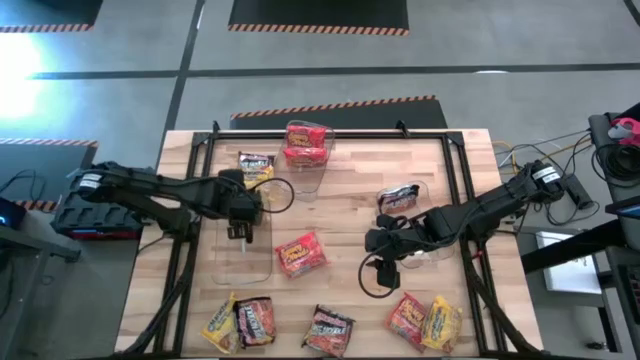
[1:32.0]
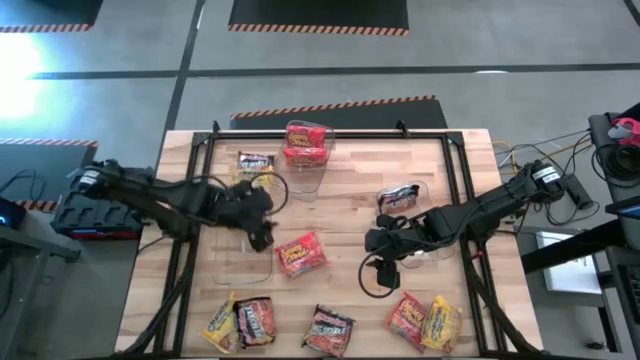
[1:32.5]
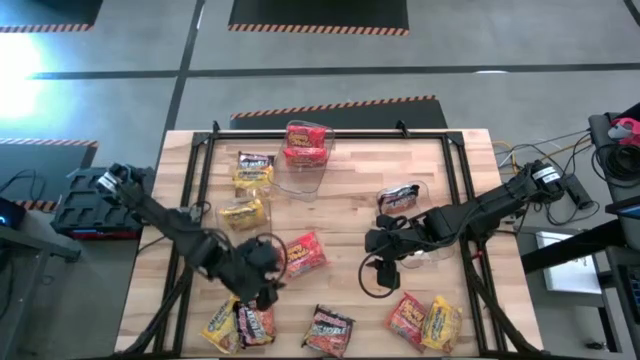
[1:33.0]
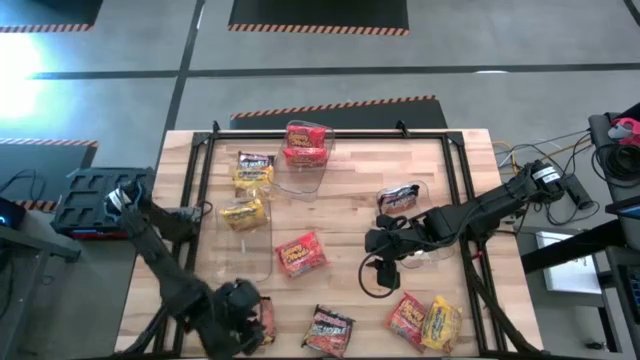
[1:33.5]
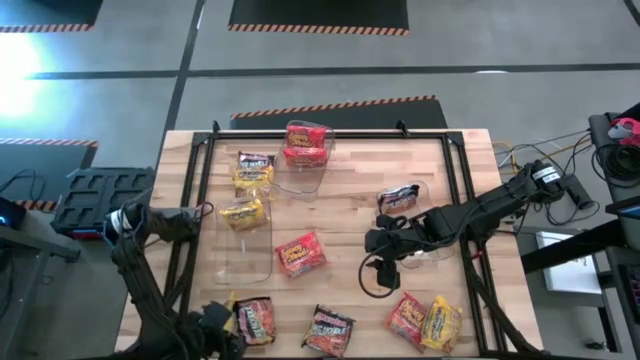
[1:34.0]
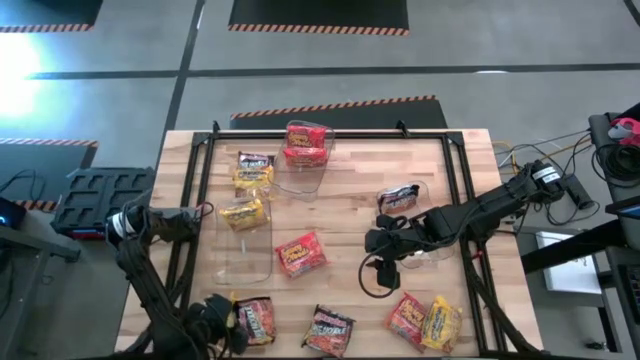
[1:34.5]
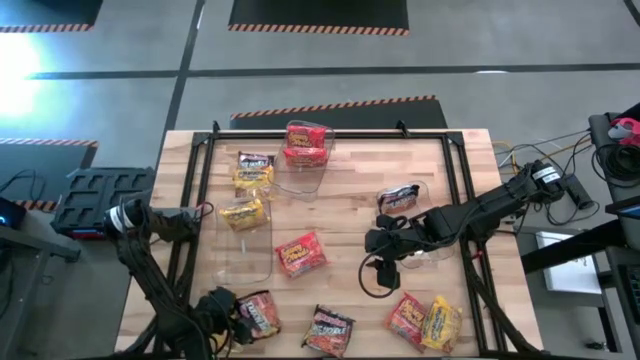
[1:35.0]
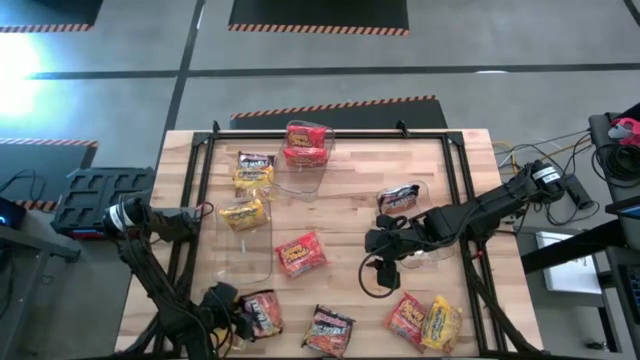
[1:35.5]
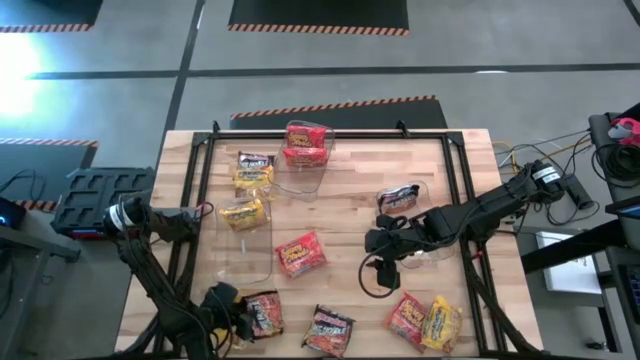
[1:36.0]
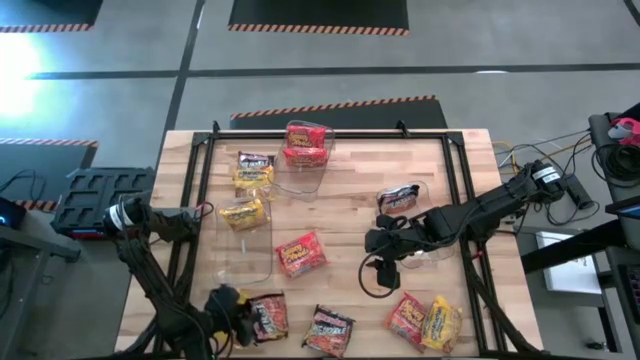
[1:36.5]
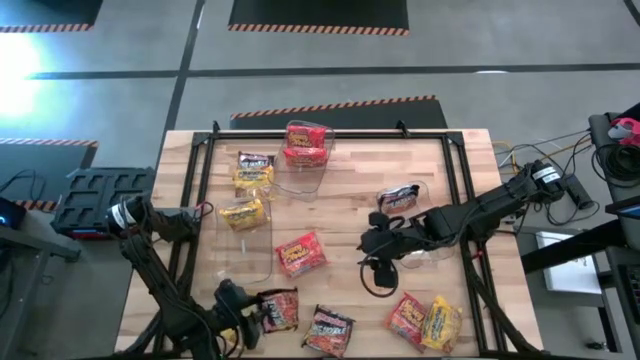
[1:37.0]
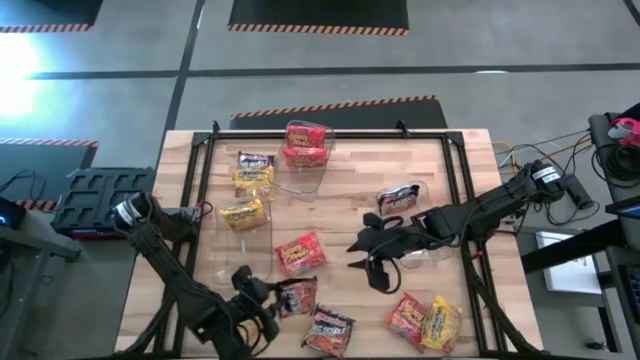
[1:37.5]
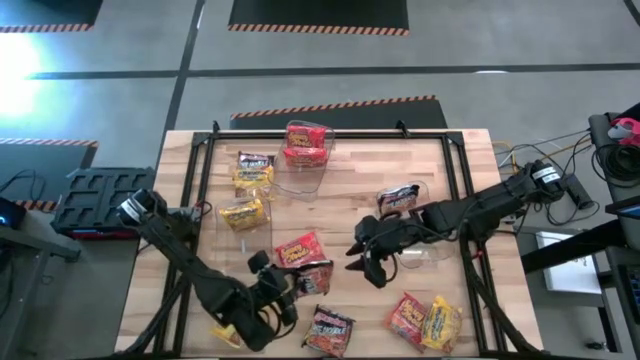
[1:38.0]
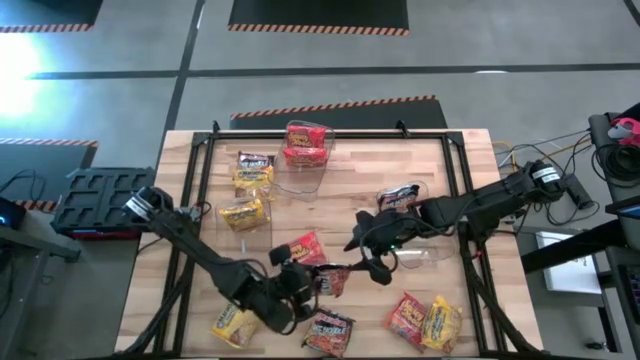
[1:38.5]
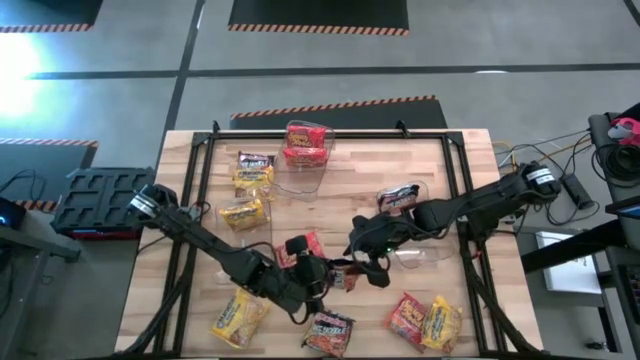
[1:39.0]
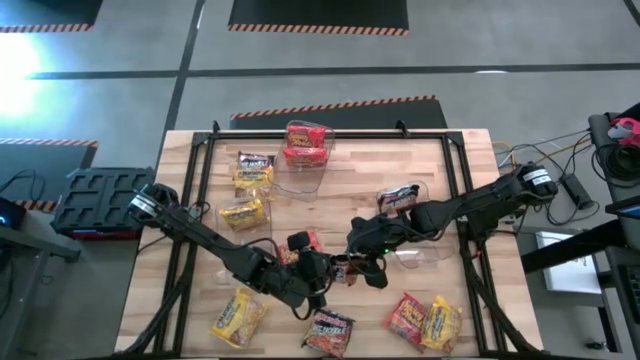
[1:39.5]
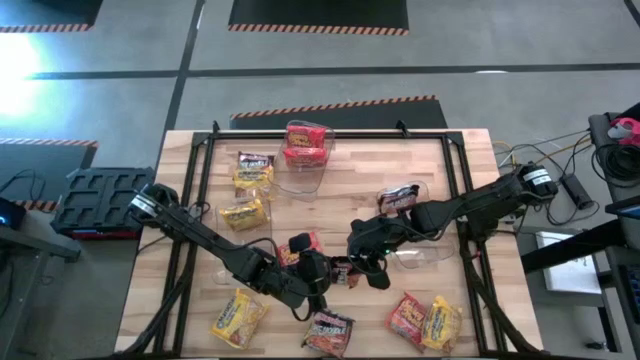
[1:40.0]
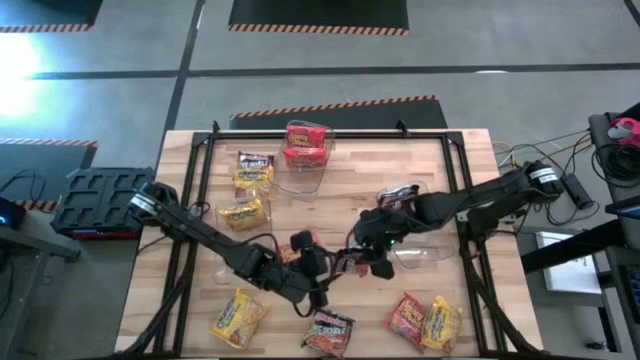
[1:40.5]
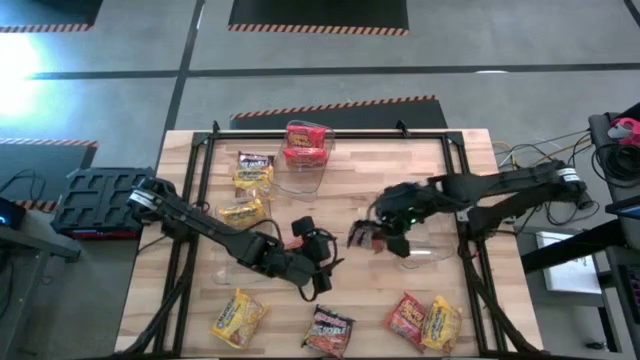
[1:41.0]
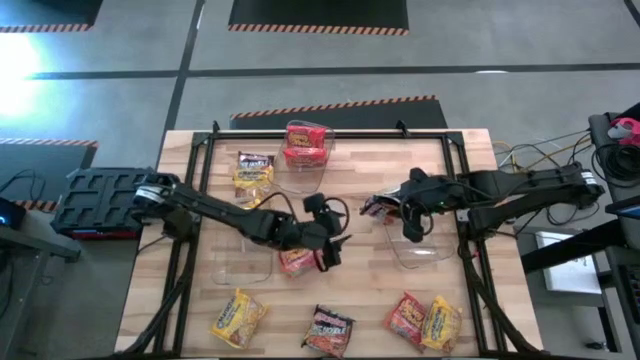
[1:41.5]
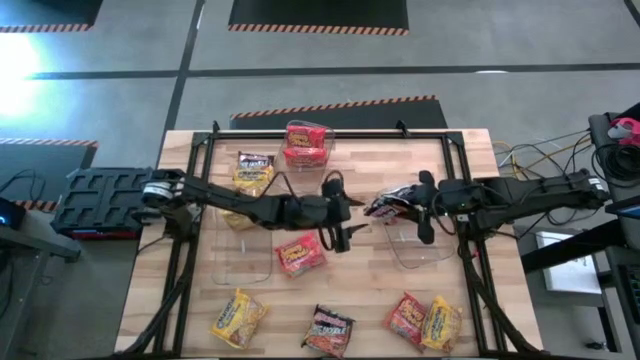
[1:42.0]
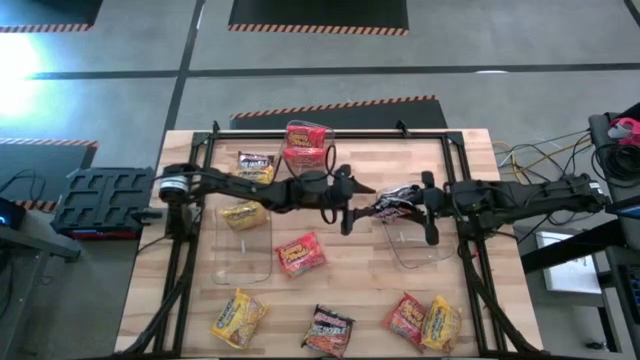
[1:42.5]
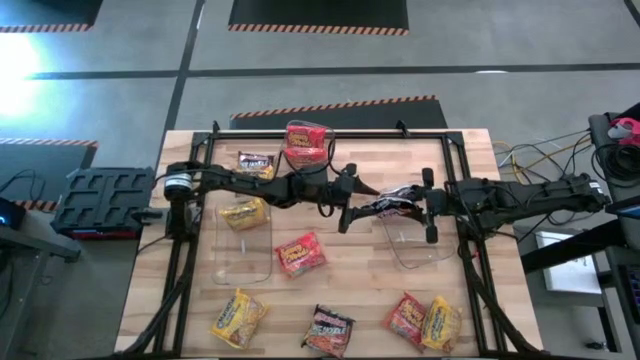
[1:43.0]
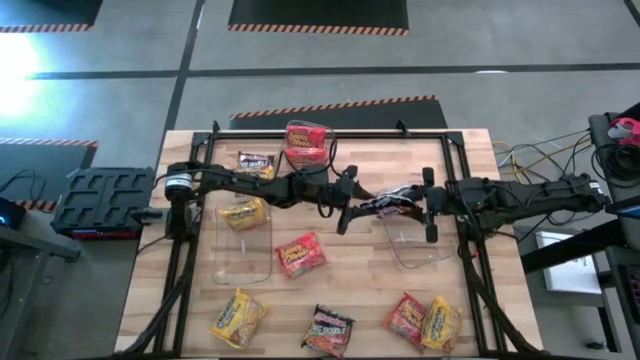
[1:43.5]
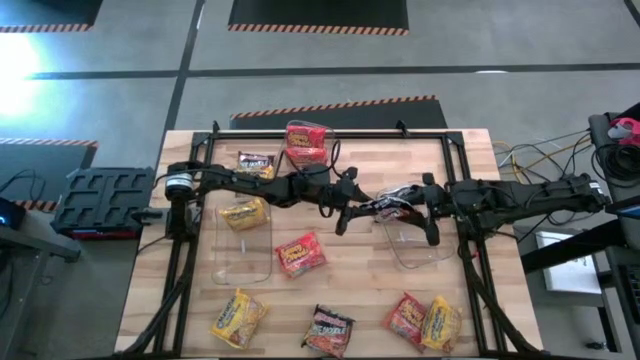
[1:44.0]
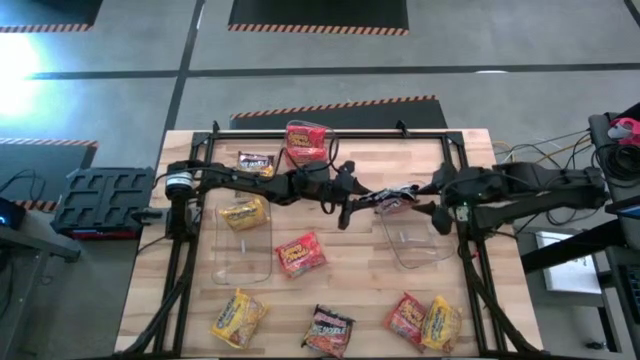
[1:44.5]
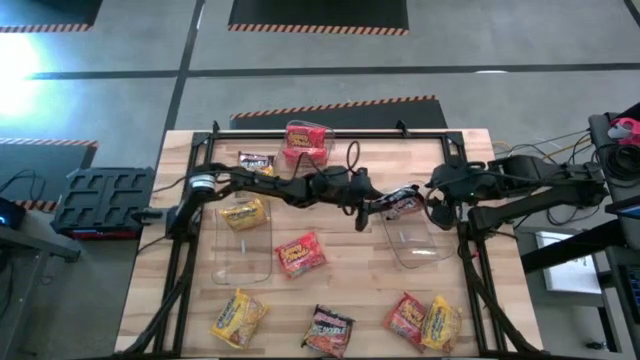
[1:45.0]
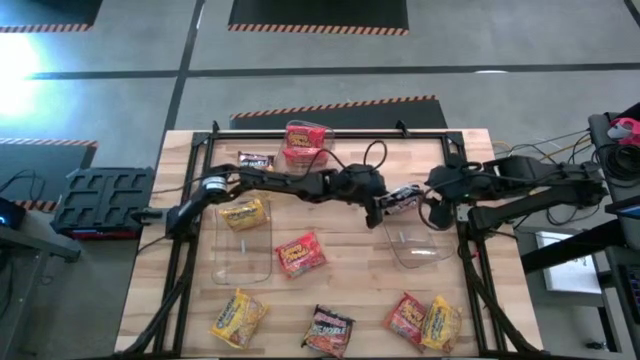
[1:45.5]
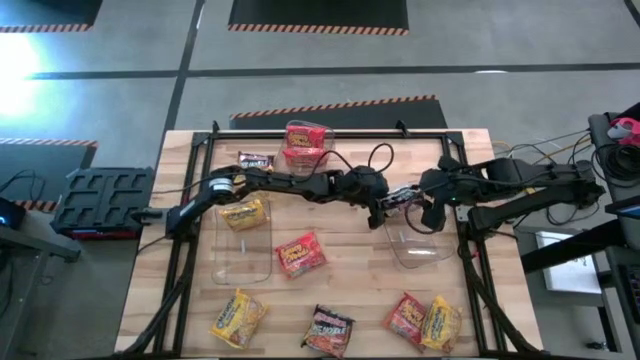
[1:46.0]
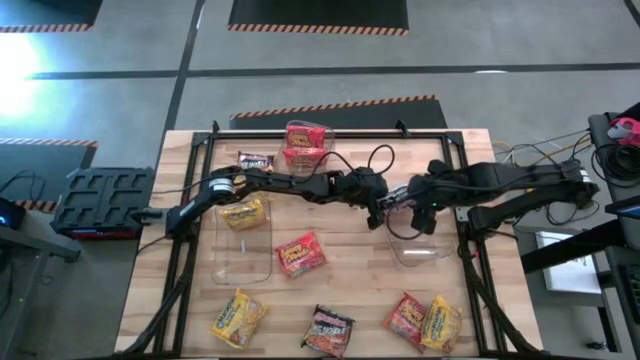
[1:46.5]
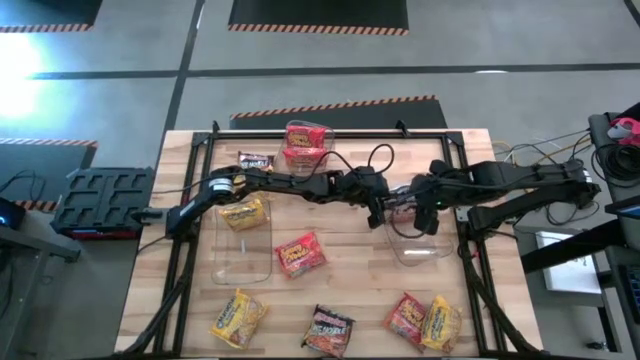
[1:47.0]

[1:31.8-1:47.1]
Task: Sort Maruchan noodles
Put the bottom left black pack noodle into the bottom right transparent bin

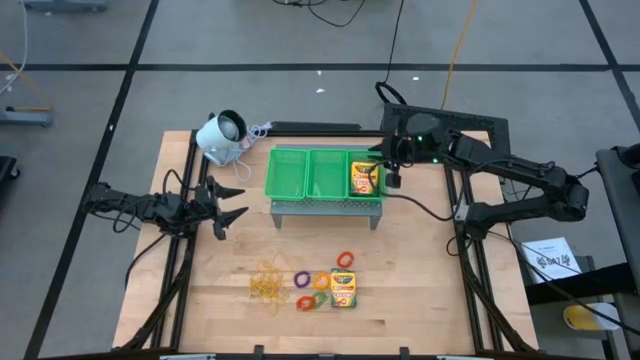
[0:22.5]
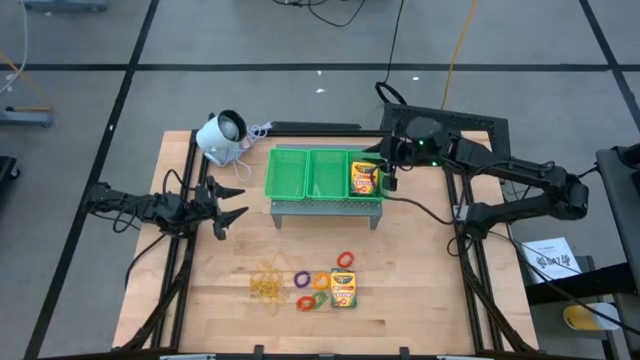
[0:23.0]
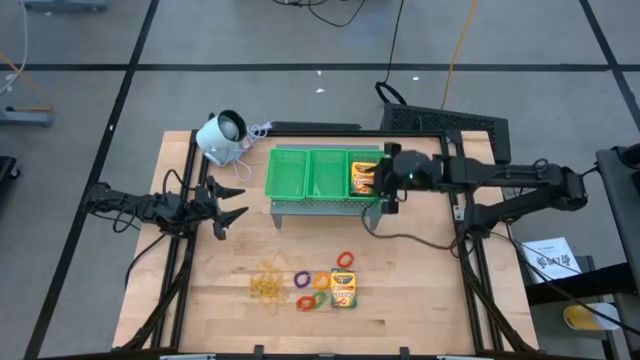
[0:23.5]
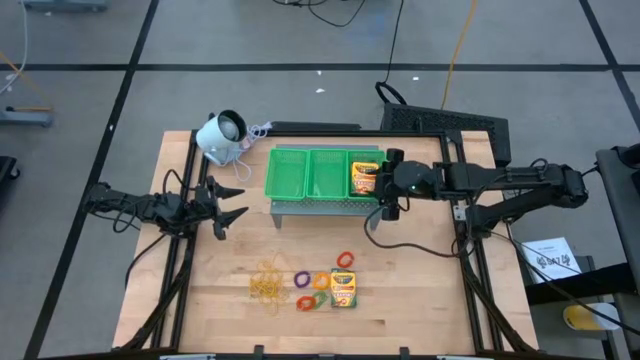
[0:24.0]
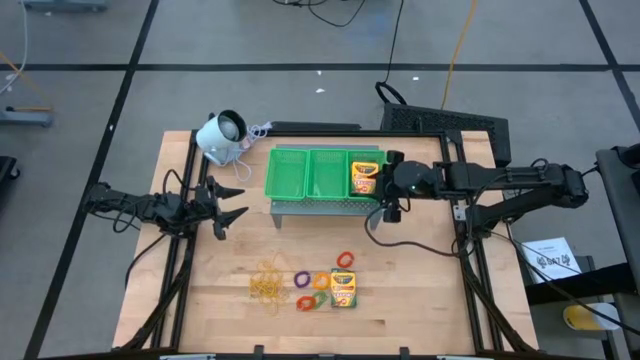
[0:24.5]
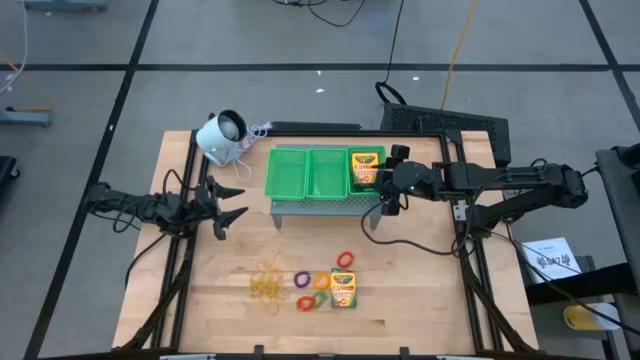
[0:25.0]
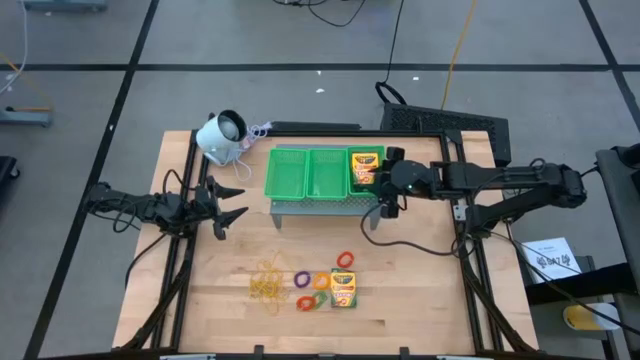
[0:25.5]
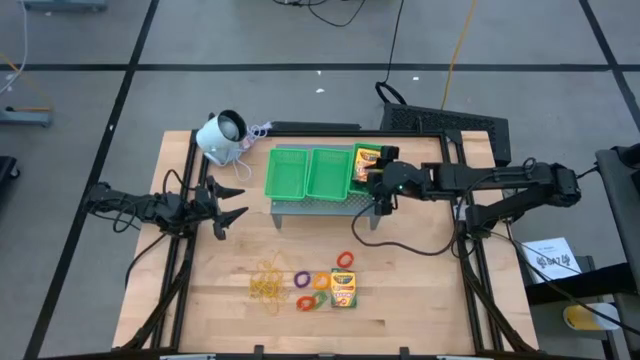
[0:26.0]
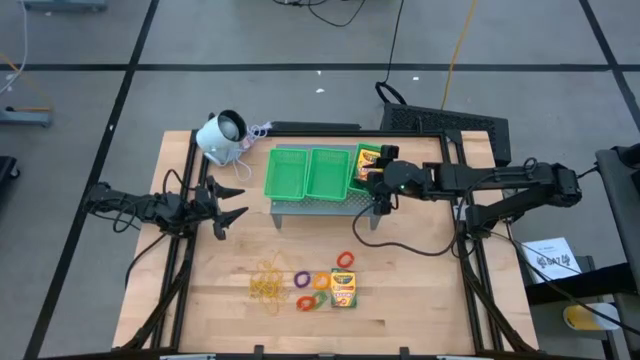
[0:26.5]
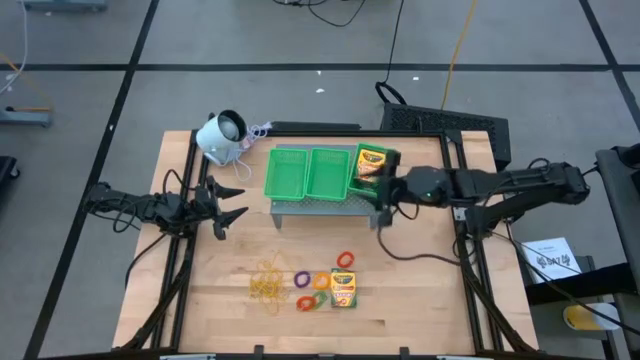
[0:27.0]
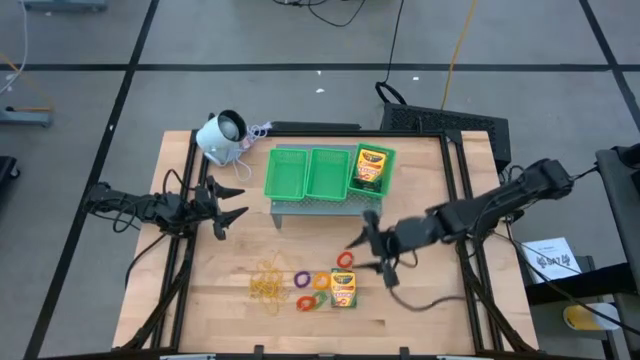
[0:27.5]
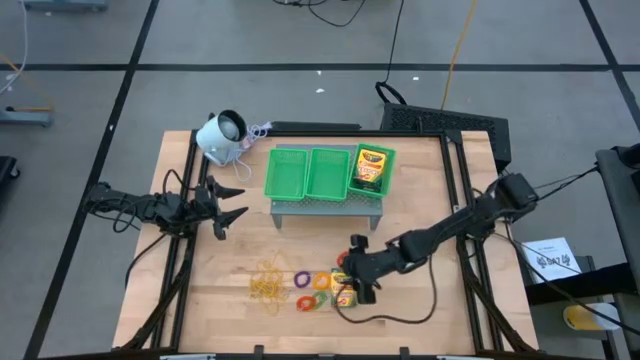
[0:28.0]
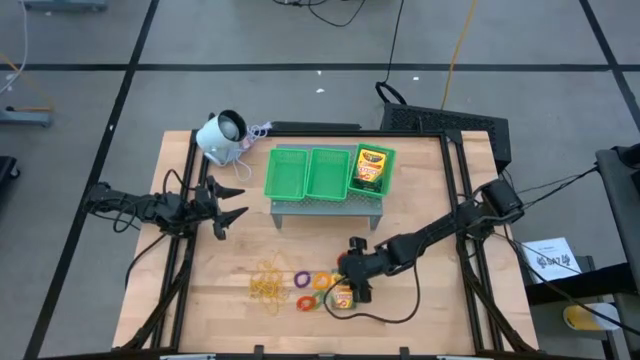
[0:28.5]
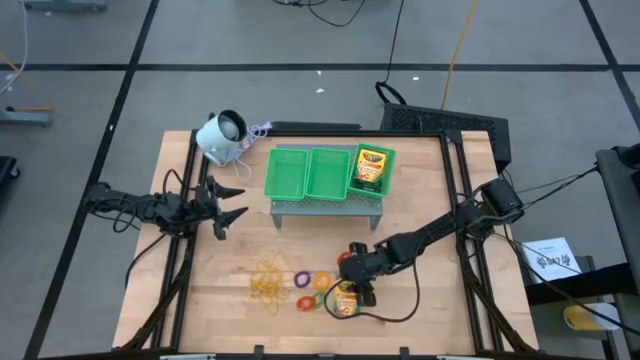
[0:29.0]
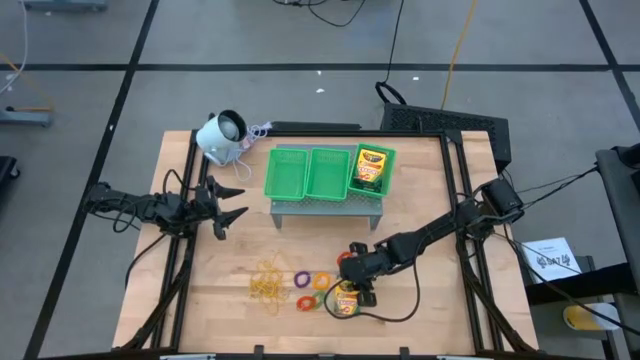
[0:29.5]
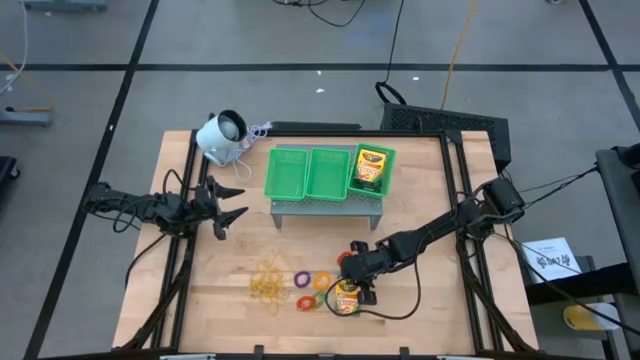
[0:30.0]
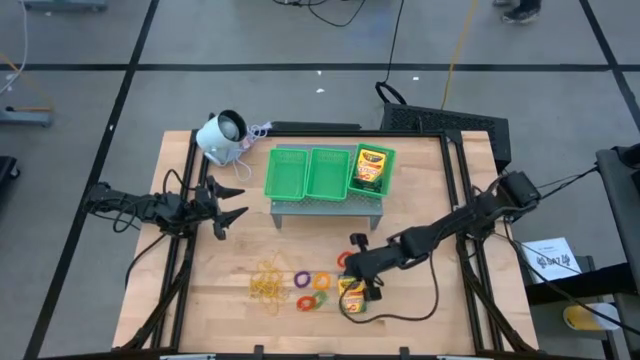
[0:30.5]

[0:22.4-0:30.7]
Task: Pick & Place Office Desk Supplies
Stack the right yellow crayon box on the yellow crayon box in the right green basket
